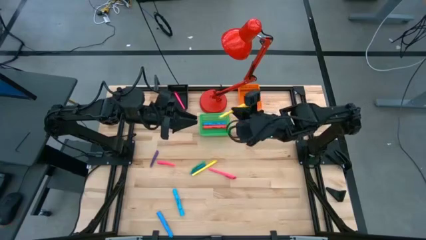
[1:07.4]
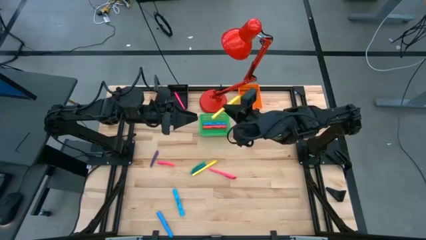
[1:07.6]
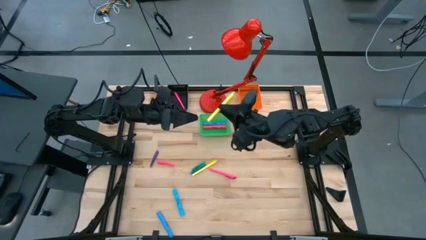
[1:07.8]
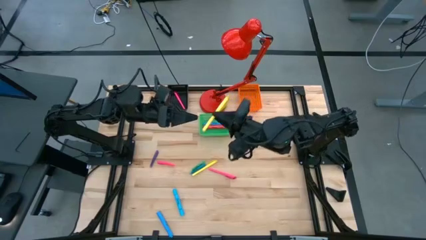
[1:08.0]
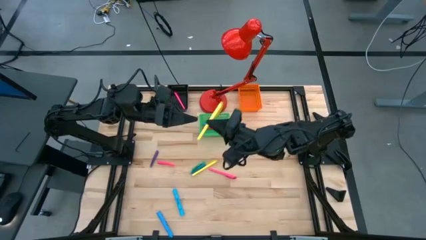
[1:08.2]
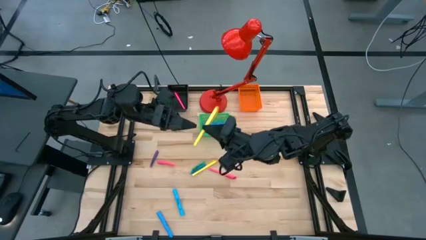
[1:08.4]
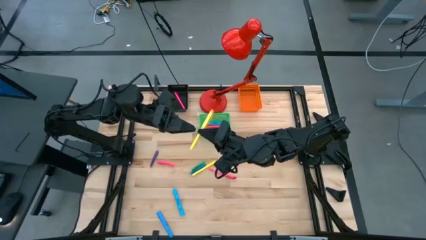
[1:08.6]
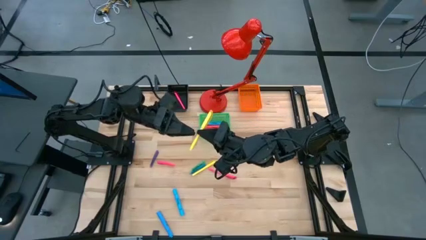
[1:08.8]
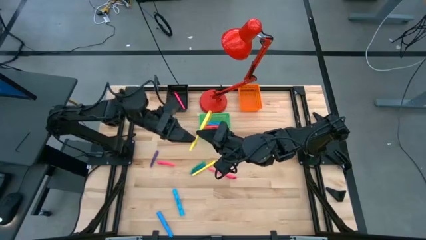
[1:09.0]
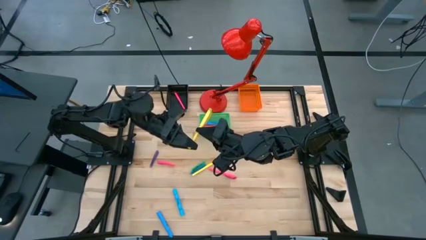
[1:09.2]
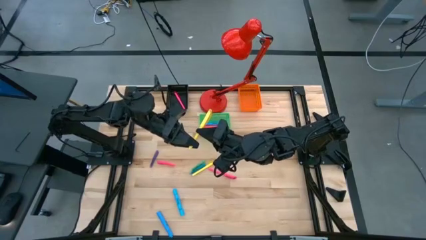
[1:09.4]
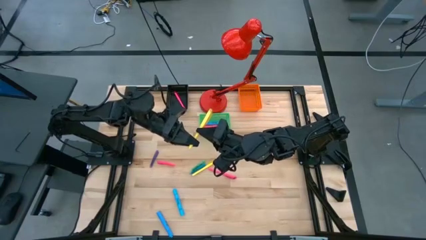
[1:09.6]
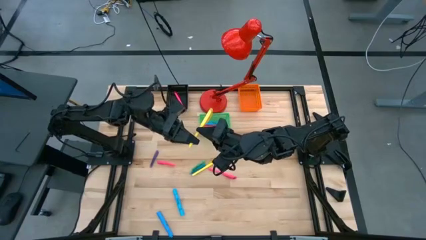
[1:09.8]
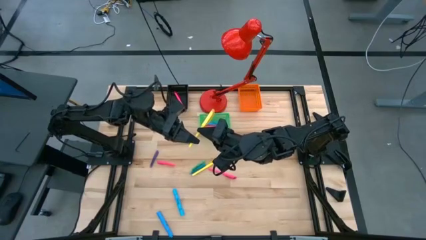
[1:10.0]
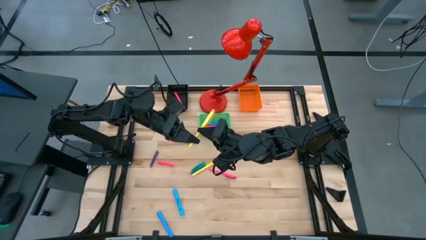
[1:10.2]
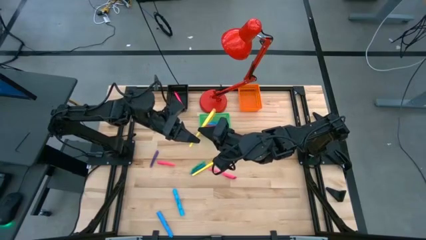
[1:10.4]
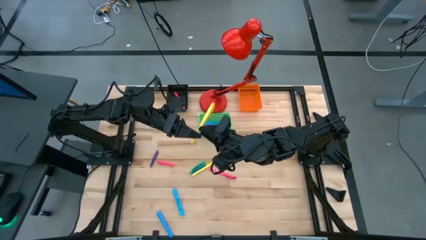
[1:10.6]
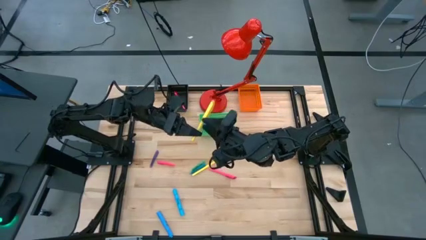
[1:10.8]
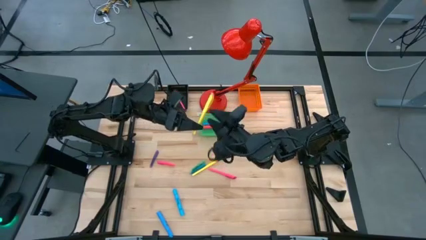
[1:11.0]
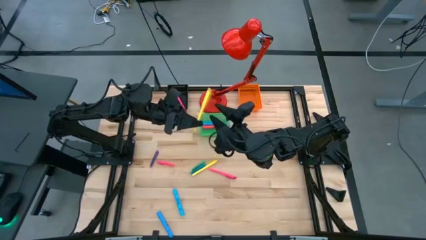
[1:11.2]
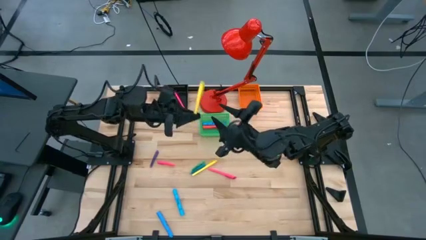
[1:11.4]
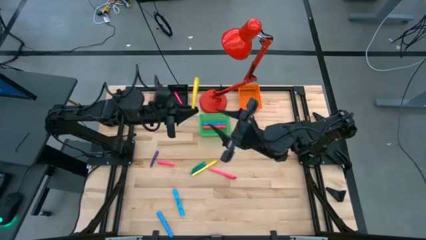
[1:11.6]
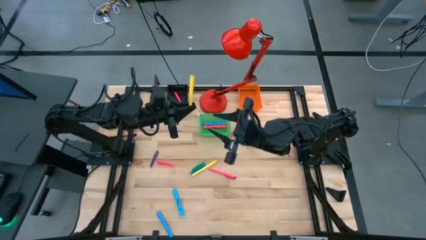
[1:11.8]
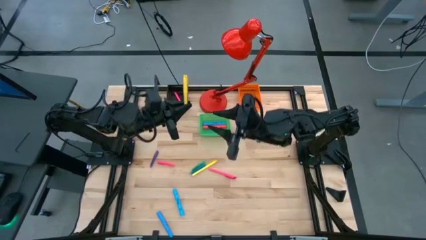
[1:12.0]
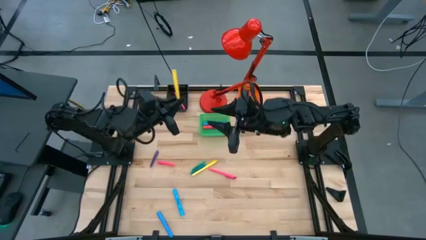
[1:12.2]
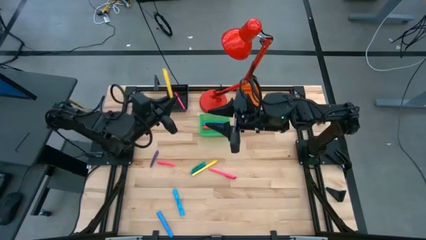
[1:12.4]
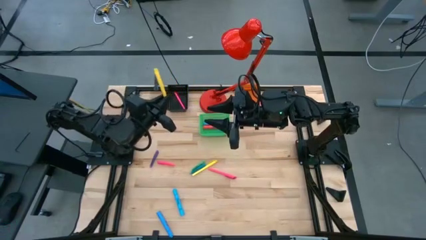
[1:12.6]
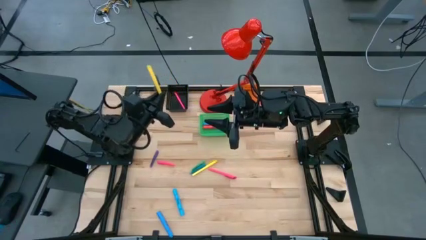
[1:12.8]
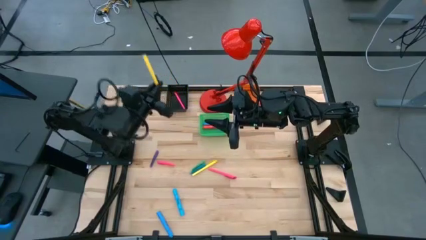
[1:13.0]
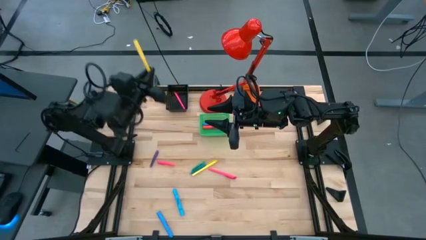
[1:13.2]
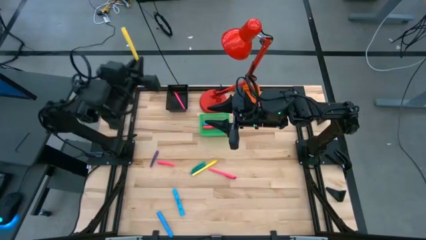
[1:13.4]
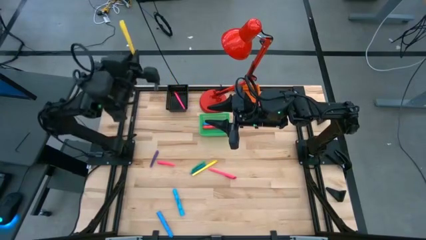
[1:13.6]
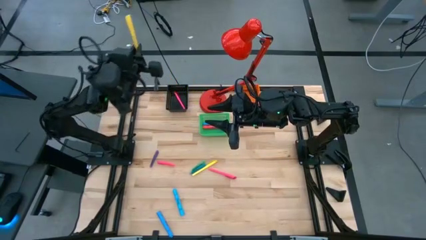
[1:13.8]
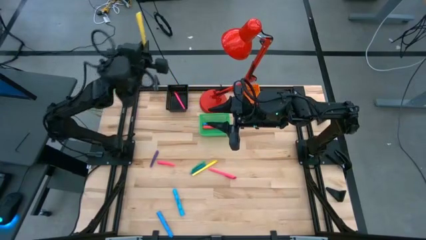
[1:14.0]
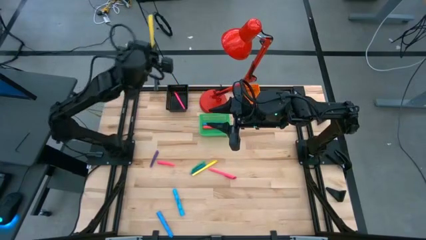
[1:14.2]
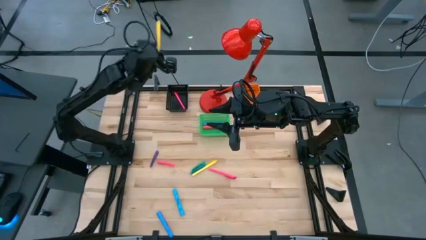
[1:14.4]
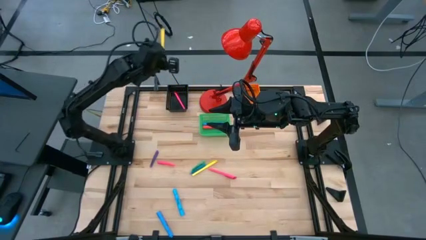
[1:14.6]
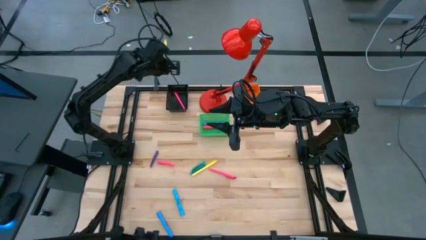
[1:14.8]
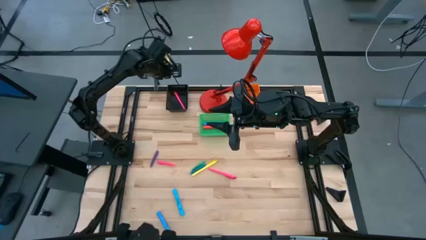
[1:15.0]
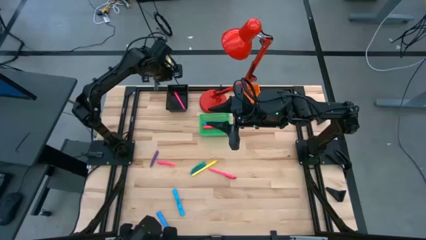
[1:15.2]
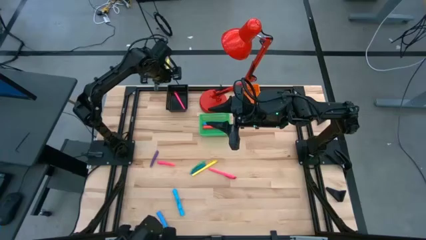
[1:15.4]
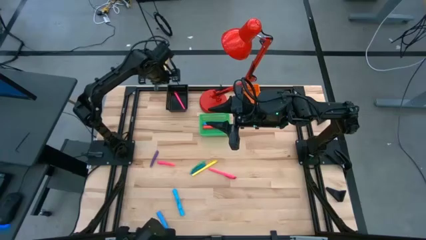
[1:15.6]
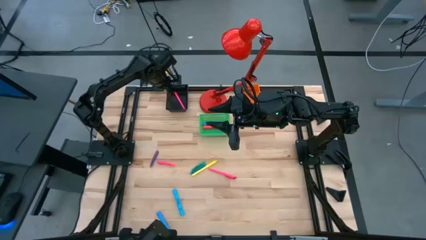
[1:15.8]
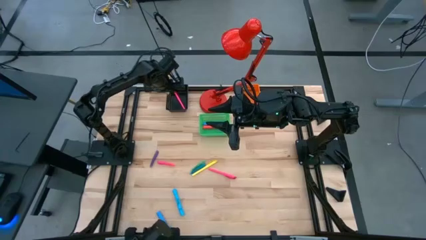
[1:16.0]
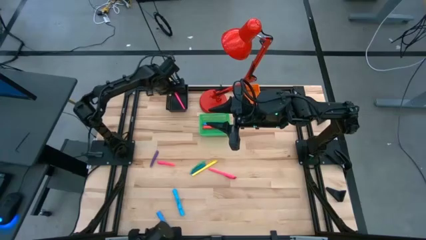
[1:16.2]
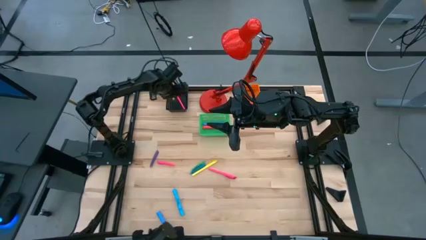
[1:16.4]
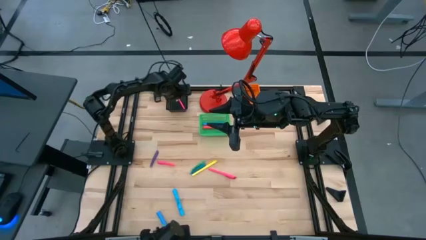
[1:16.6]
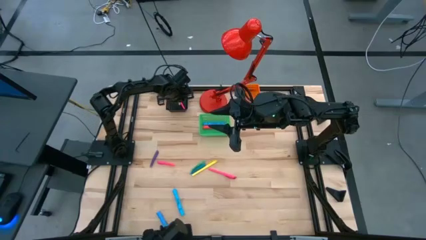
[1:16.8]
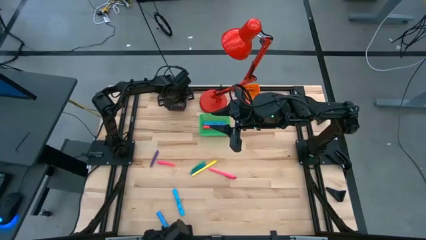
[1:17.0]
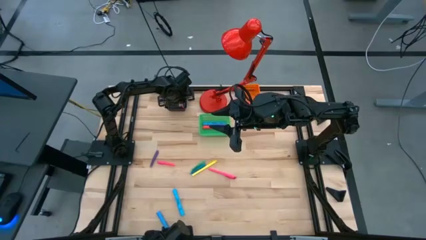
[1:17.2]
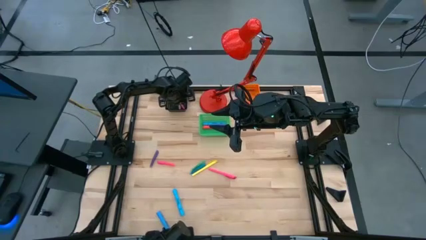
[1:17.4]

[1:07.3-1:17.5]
Task: Pick & Place Markers
Put the yellow pen into the black basket

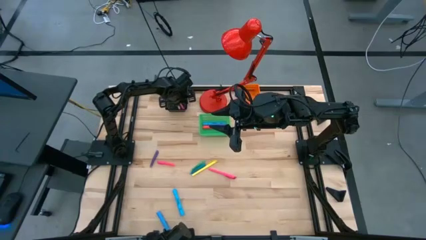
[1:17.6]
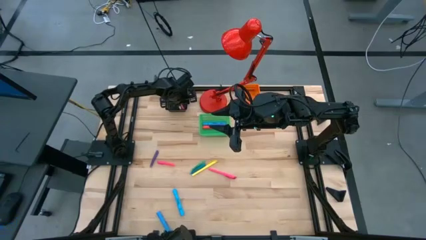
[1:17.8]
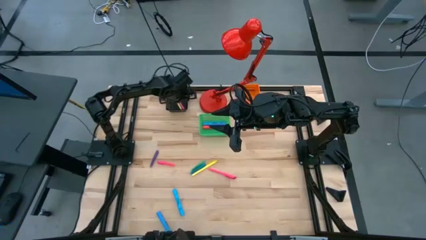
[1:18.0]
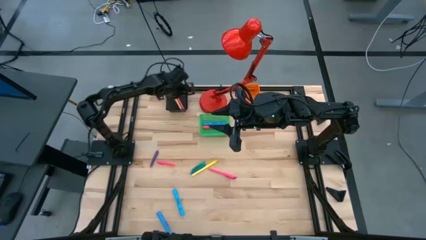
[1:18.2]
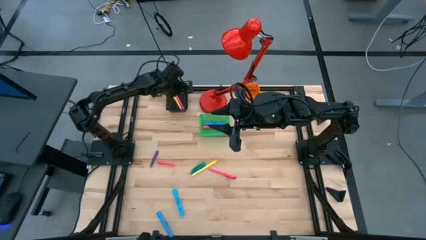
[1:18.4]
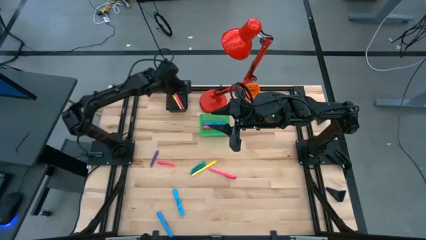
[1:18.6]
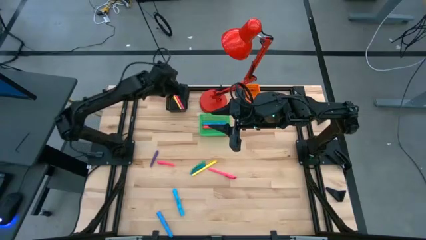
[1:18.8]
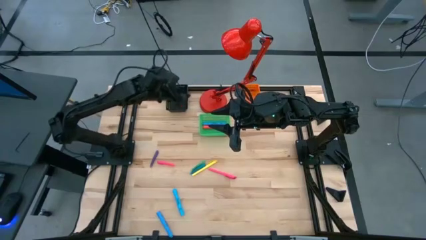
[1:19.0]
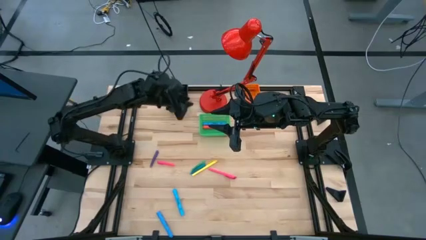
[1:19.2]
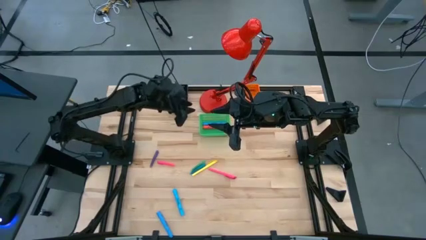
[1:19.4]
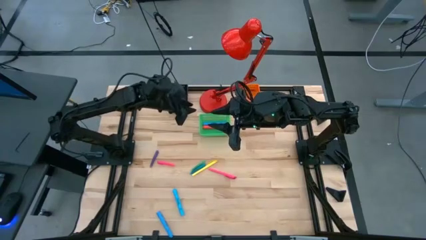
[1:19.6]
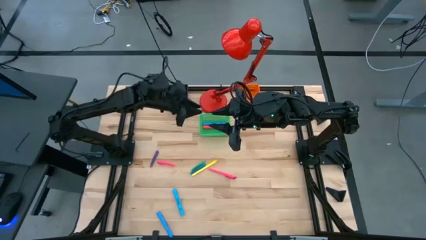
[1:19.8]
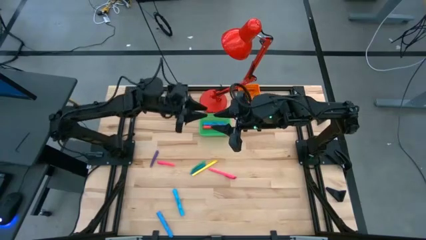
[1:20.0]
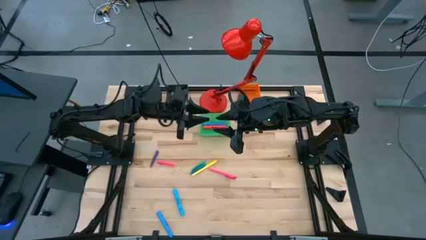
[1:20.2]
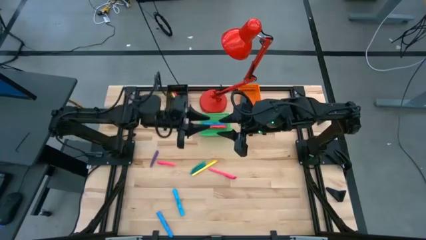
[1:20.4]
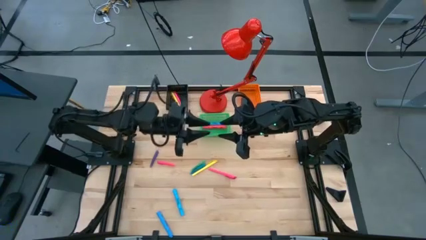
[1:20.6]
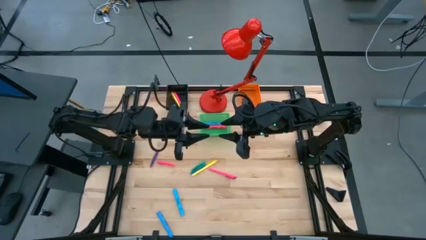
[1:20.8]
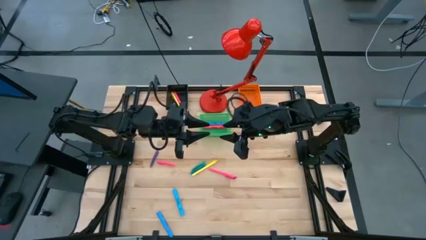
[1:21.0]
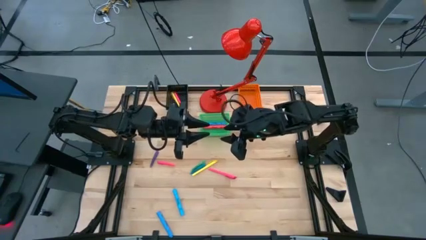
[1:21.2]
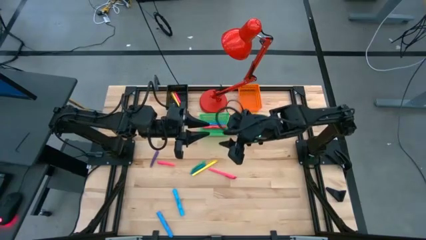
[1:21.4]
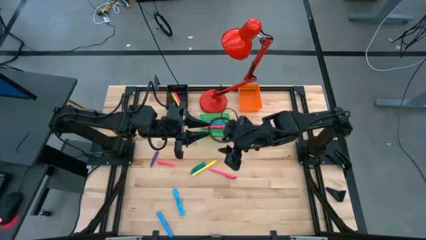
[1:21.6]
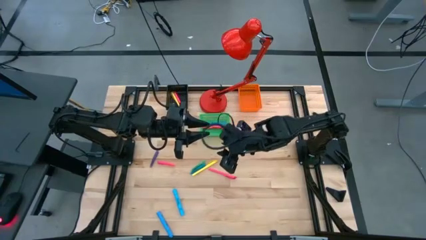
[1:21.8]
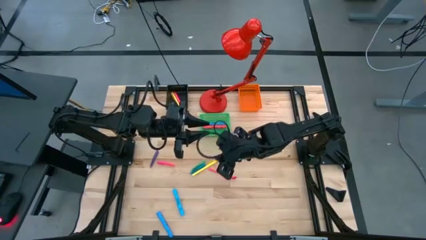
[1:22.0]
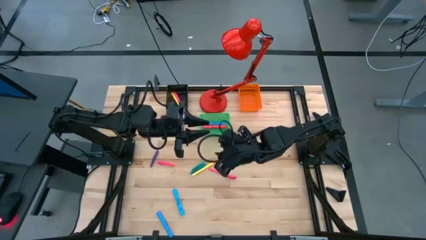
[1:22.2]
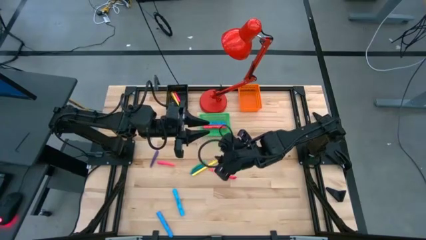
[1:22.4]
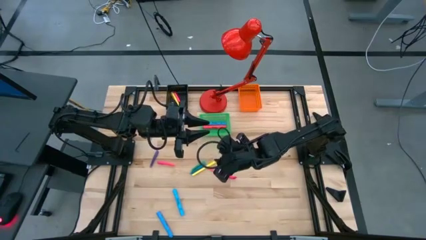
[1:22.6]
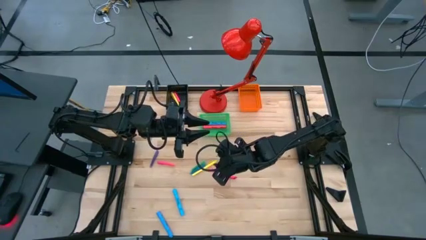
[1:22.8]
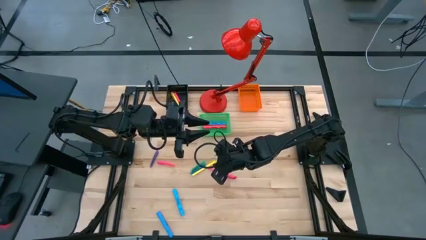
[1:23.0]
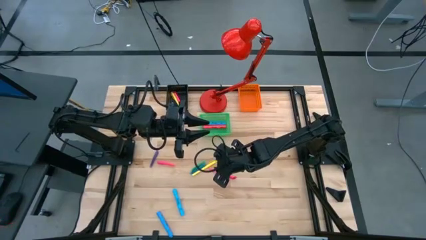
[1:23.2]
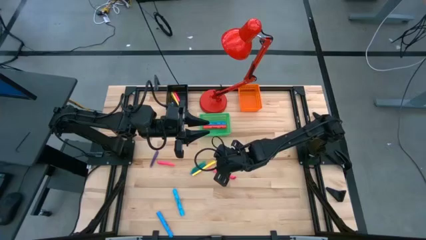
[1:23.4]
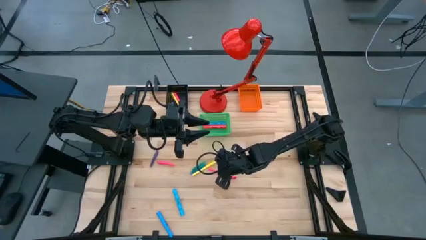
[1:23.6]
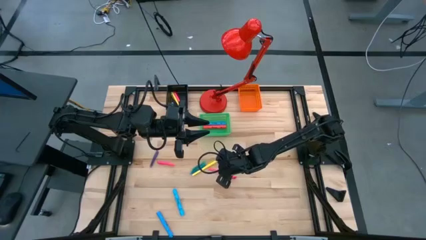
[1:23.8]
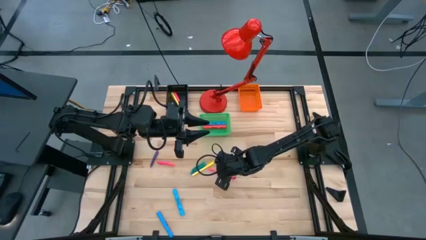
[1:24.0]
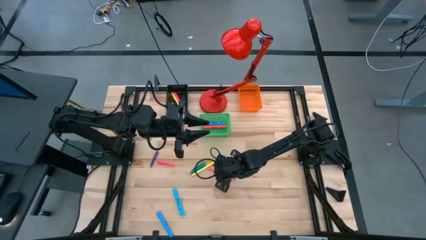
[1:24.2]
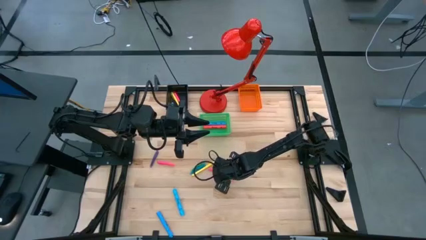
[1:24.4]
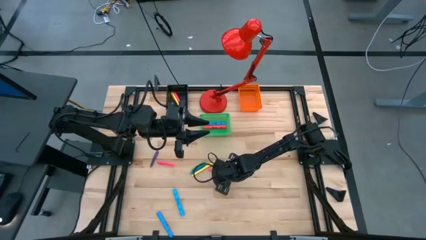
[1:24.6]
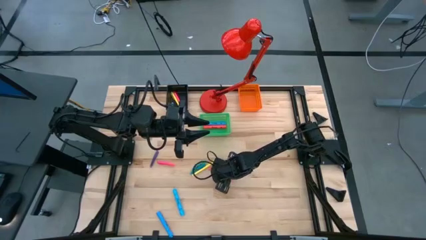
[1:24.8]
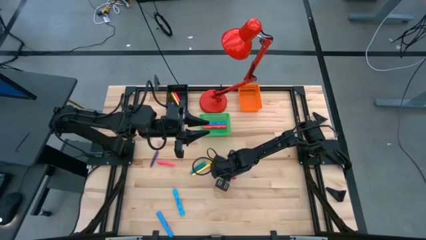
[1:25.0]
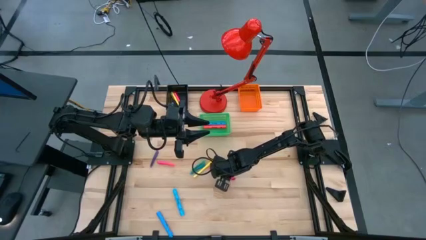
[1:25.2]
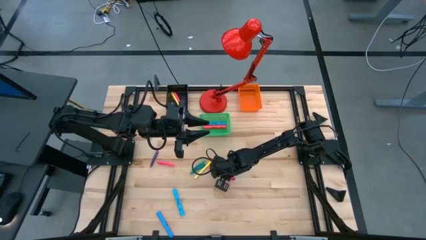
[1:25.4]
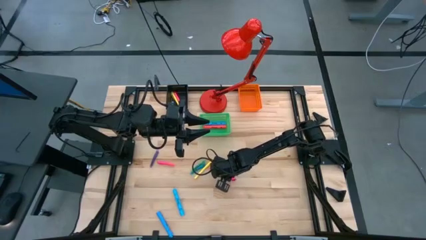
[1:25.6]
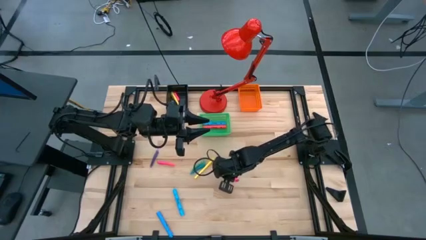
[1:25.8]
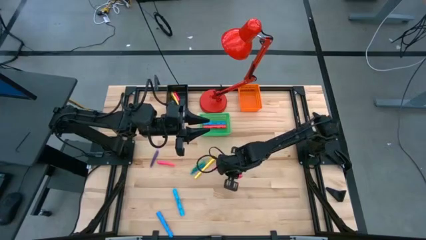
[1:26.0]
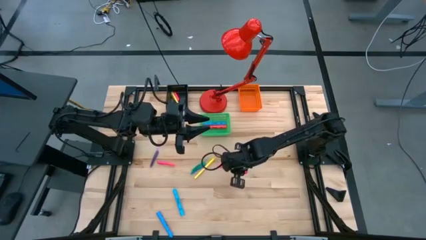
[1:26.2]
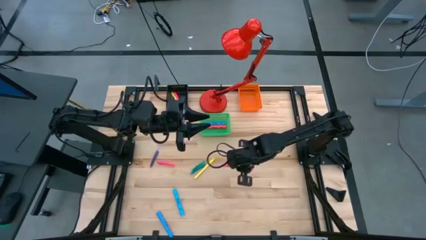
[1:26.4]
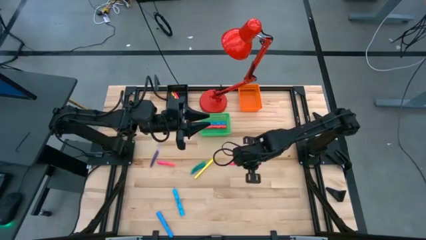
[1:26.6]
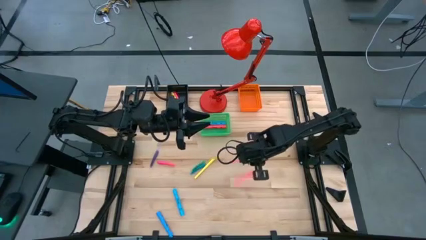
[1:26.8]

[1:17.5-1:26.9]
Put the pink pen into the black basket
